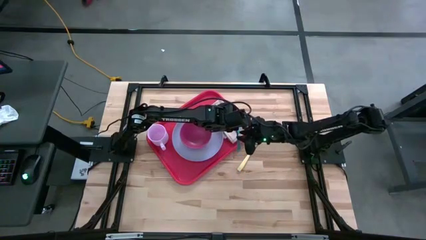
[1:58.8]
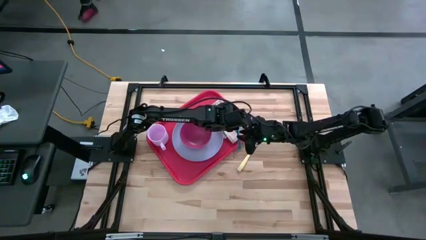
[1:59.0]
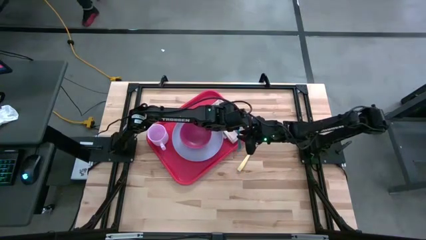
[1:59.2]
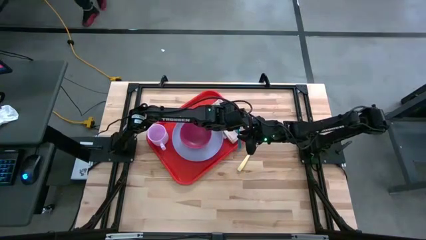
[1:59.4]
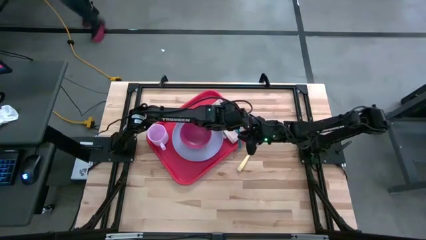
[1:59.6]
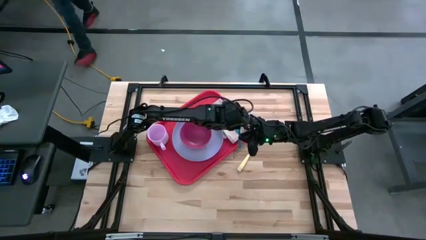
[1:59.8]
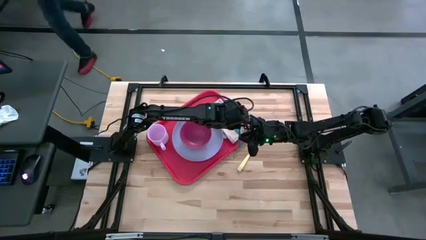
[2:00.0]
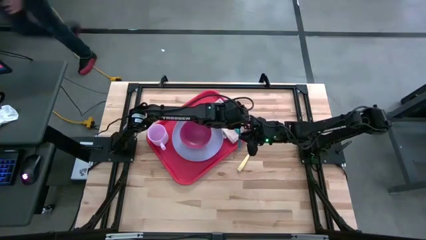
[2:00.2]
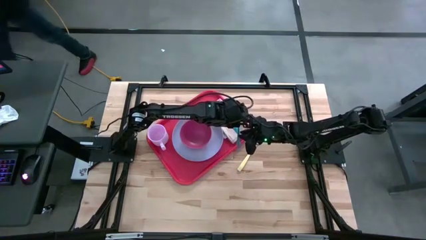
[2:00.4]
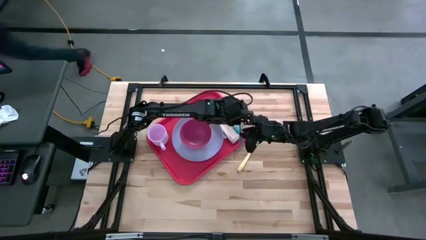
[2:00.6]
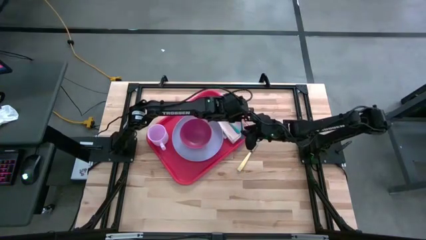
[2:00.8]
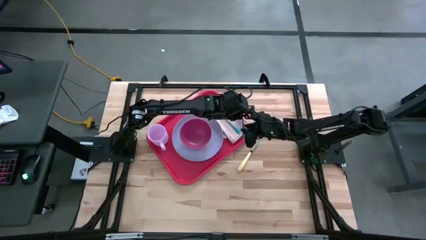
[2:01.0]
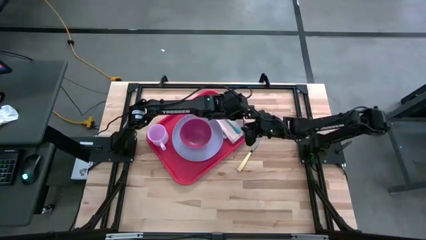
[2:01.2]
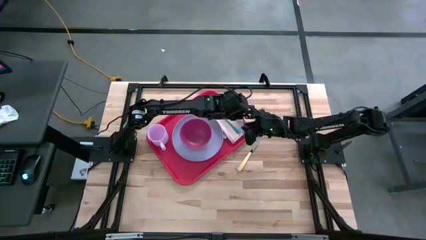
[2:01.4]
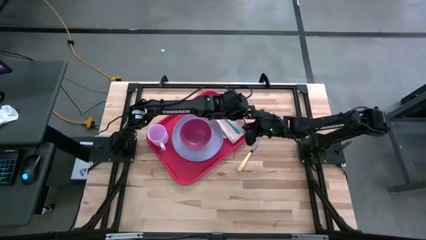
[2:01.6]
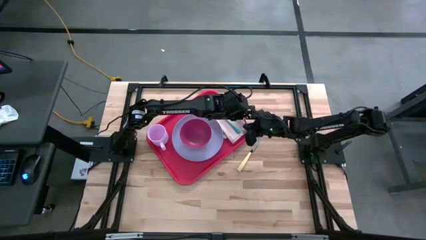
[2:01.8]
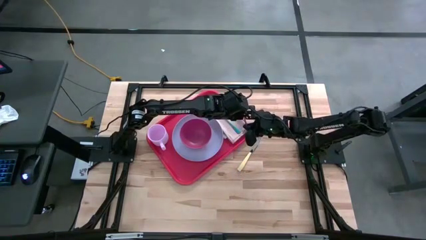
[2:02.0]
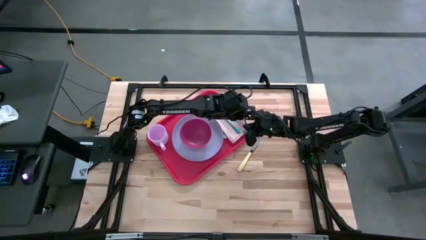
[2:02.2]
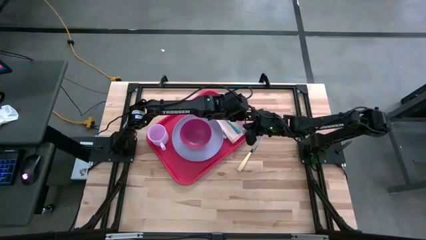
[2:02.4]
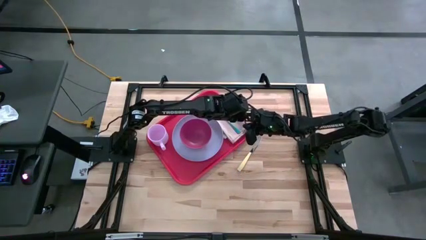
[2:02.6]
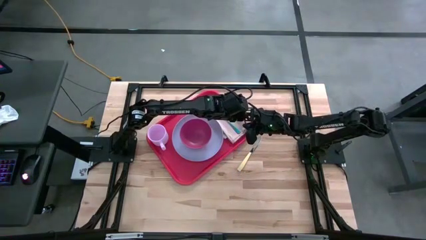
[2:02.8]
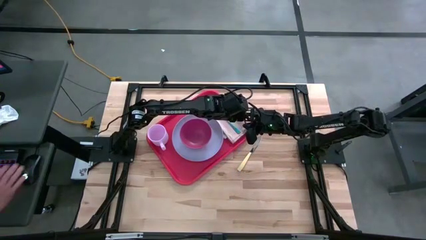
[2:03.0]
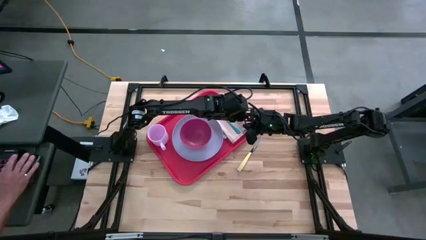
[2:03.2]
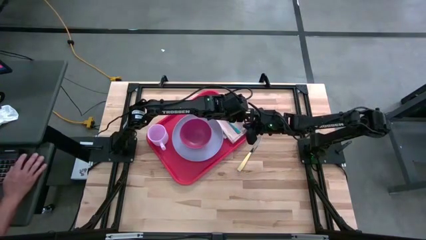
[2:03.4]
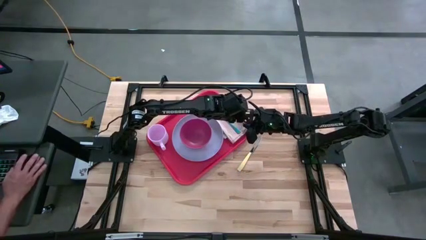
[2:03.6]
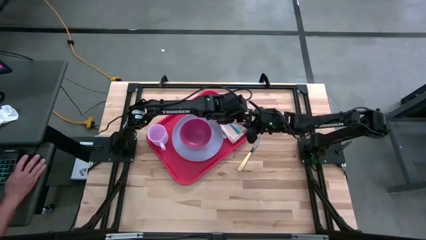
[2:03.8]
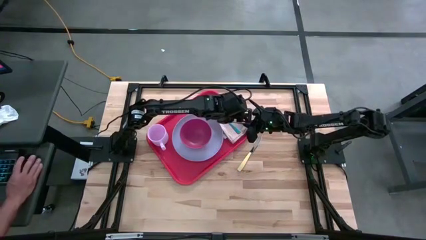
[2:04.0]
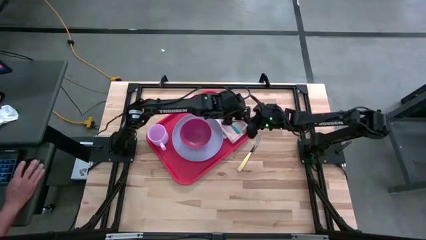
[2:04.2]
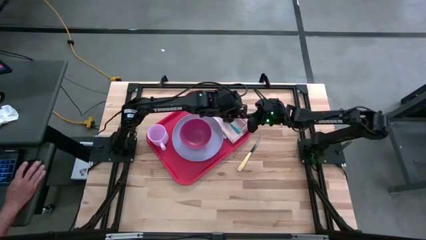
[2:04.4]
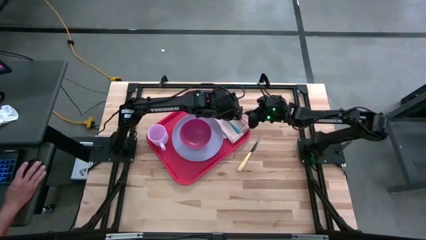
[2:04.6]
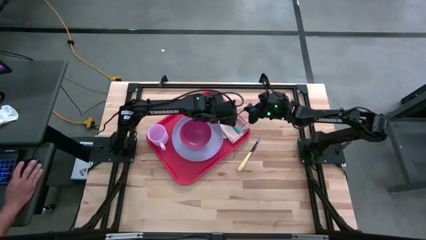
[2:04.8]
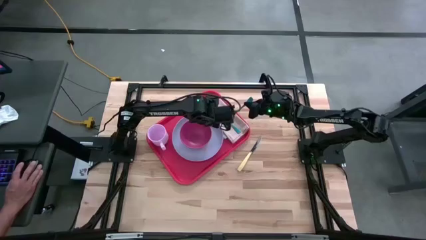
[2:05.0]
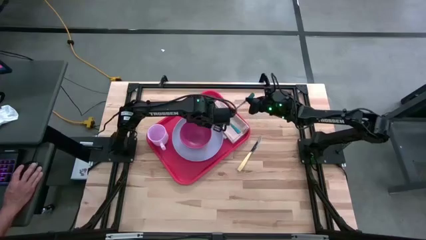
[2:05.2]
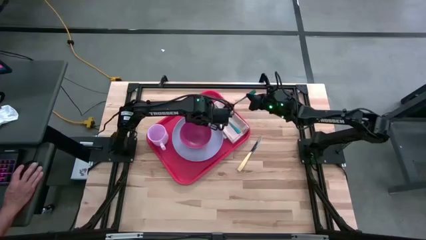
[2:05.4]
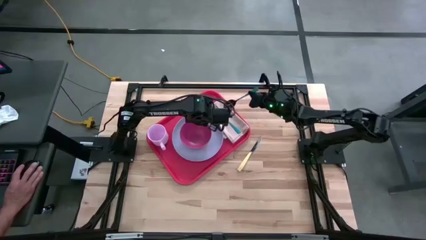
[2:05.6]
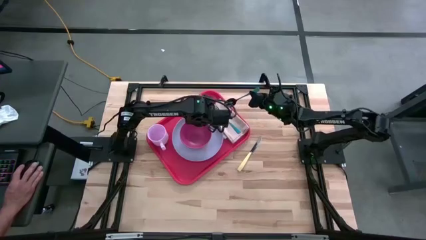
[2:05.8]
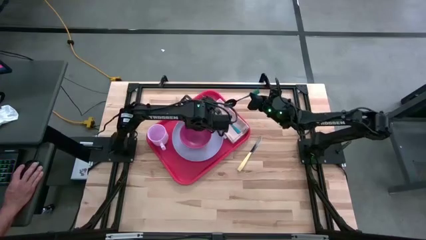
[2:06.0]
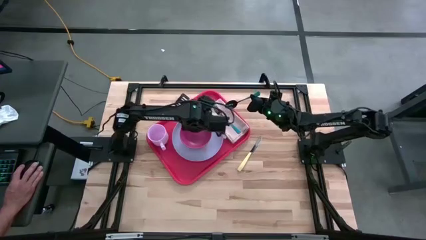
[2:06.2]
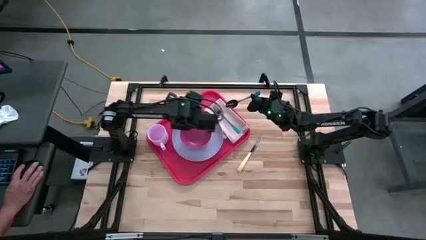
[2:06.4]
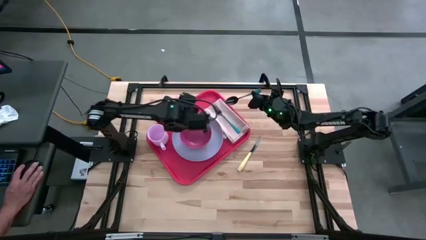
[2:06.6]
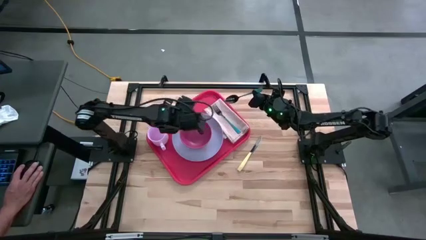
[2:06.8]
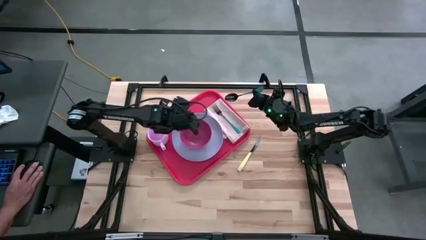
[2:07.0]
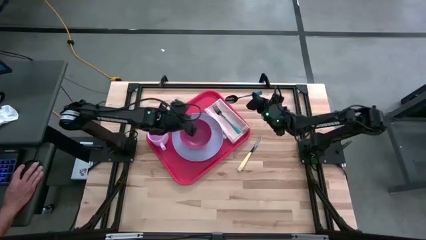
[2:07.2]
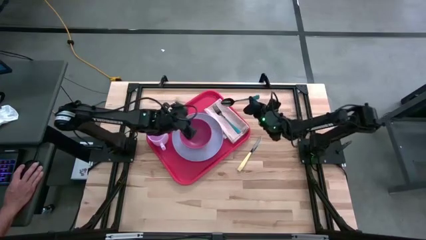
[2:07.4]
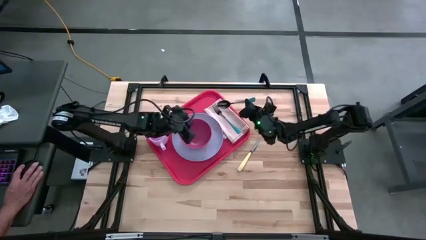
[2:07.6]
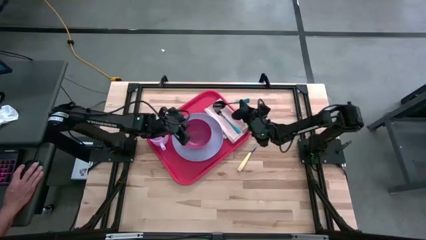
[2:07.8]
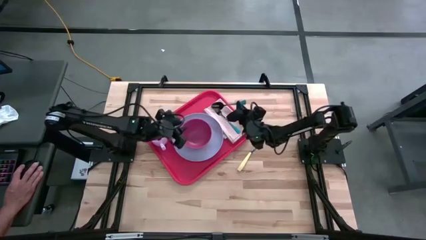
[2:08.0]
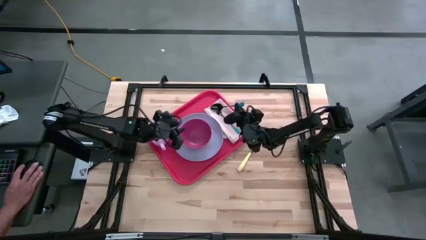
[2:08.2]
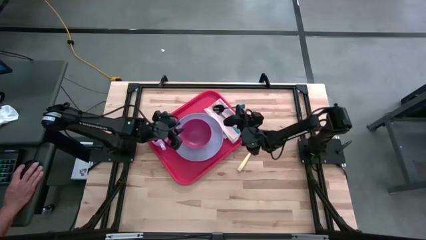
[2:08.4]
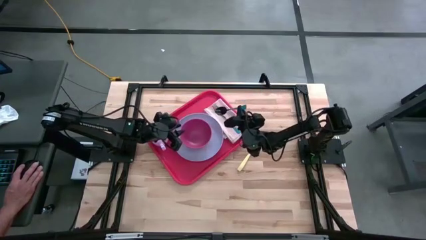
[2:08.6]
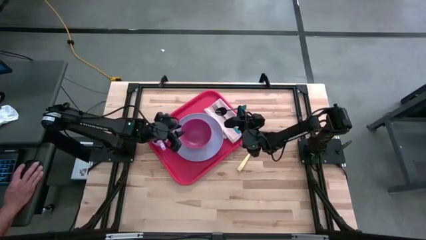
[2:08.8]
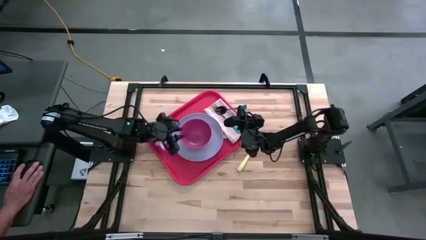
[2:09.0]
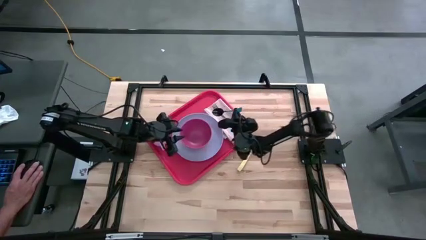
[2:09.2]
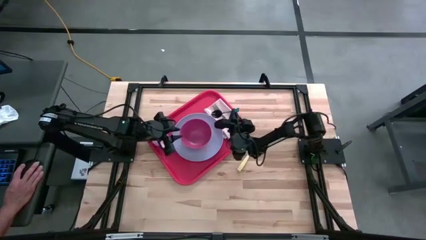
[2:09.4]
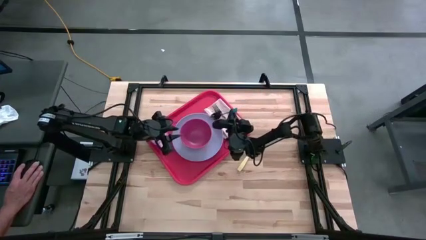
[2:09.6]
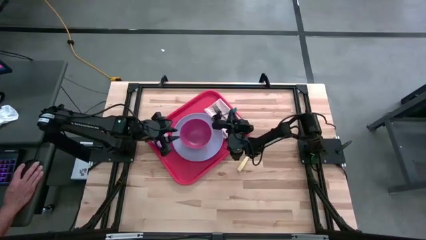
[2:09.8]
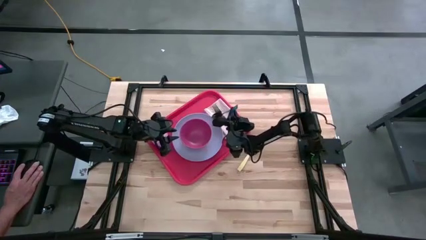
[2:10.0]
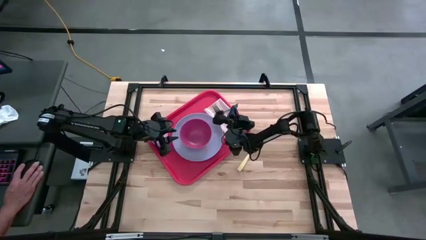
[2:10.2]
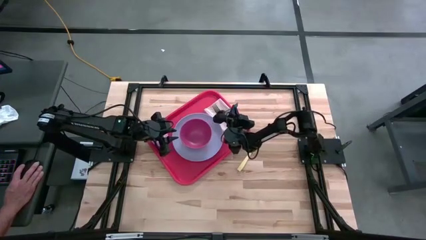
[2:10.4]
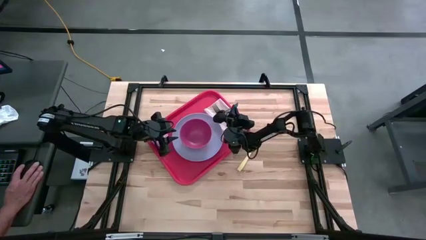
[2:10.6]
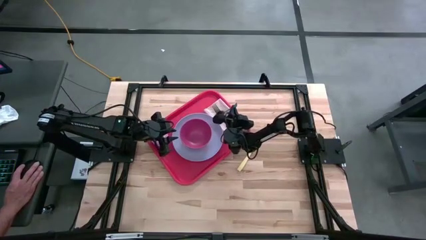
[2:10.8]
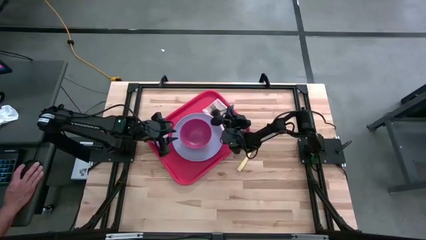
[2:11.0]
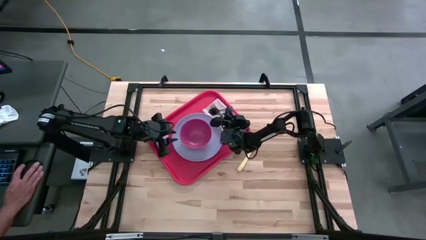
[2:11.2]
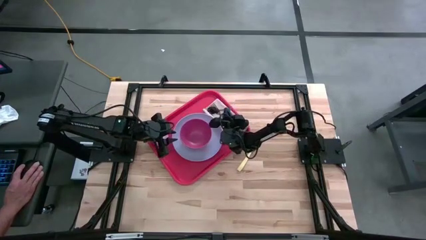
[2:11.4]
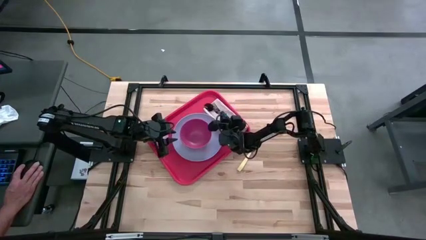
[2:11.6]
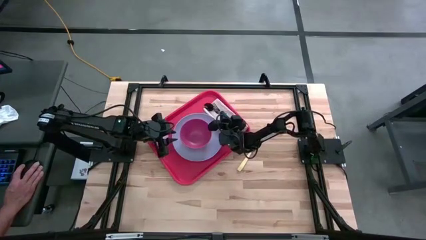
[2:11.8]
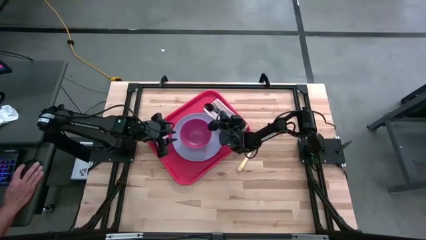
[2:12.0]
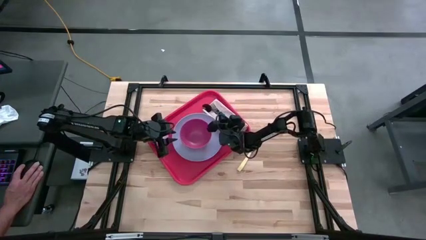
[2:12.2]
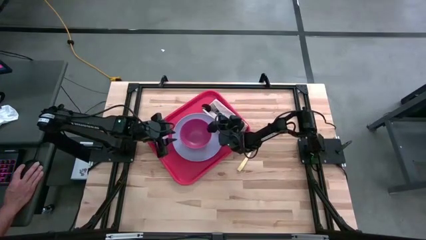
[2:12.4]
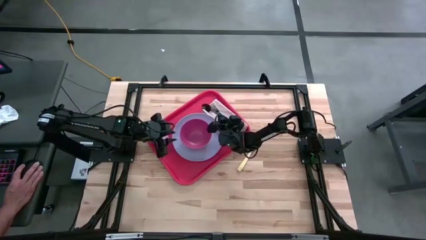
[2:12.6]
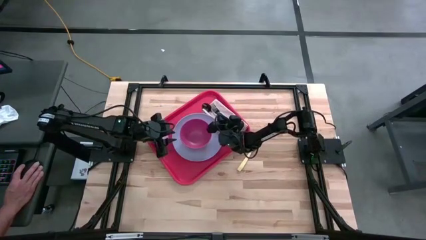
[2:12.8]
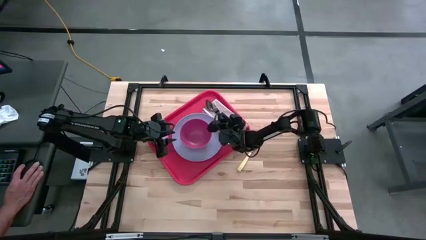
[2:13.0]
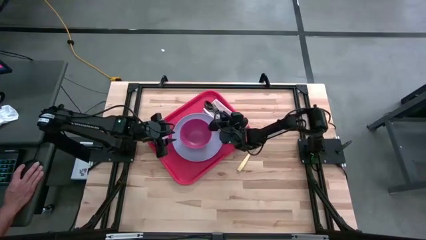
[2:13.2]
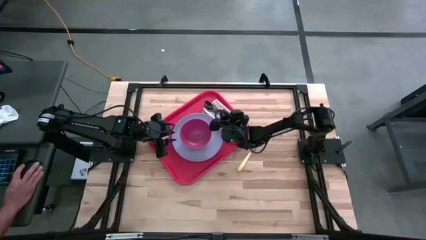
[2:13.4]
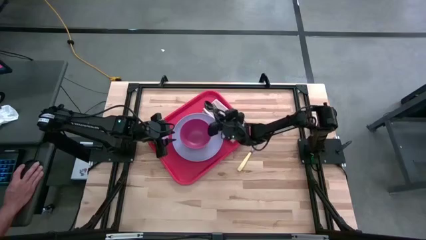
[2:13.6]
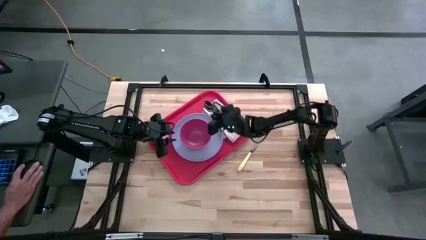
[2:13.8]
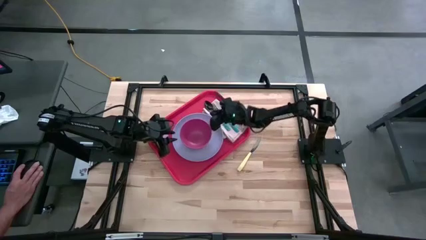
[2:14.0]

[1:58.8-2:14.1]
Task: Set up tray
Put the blue spoon on top of the brown table napkin to the left of the blue fork on the red serving tray

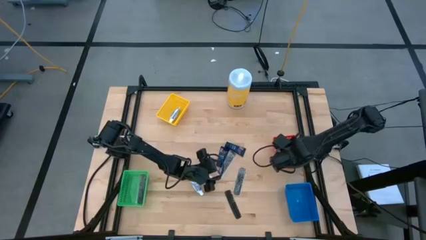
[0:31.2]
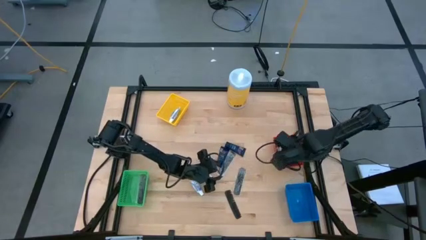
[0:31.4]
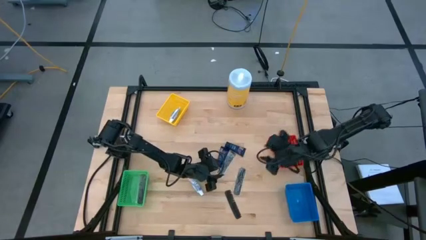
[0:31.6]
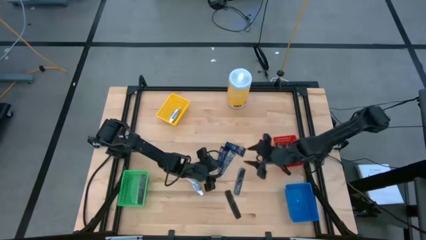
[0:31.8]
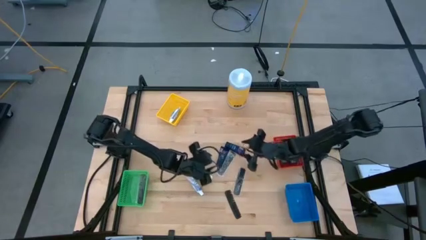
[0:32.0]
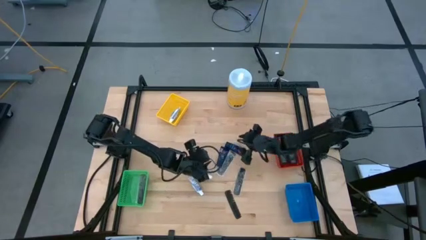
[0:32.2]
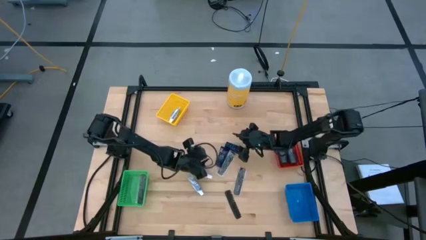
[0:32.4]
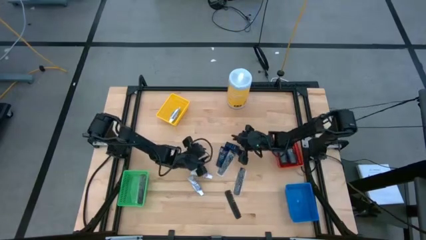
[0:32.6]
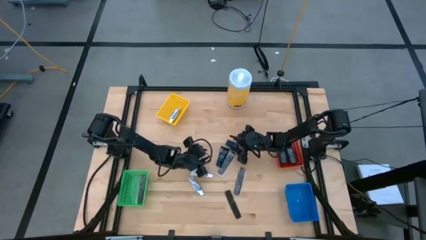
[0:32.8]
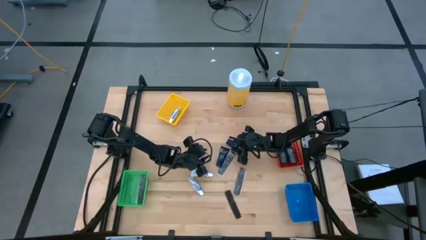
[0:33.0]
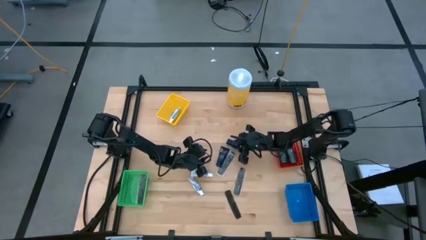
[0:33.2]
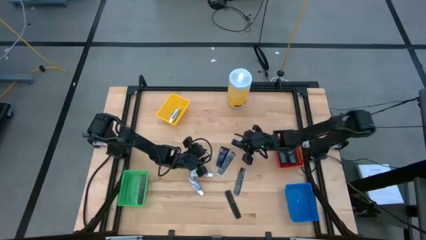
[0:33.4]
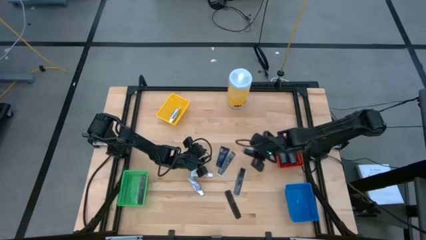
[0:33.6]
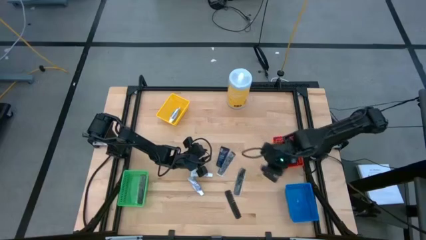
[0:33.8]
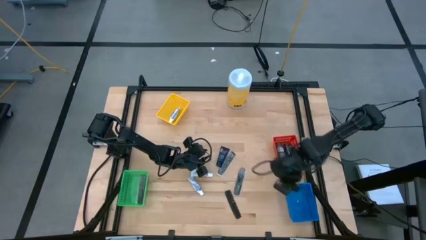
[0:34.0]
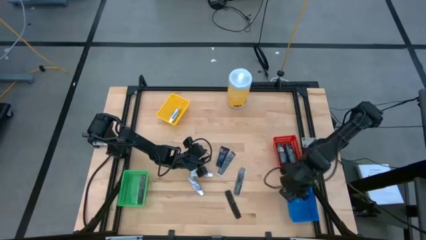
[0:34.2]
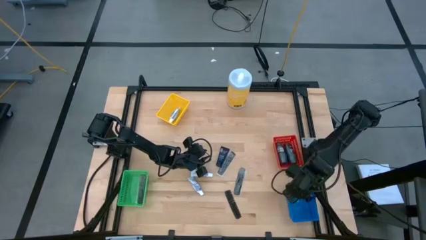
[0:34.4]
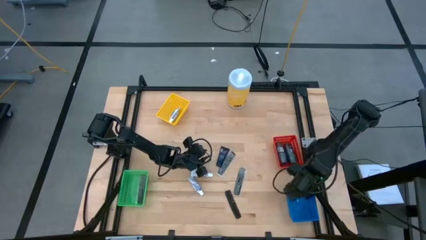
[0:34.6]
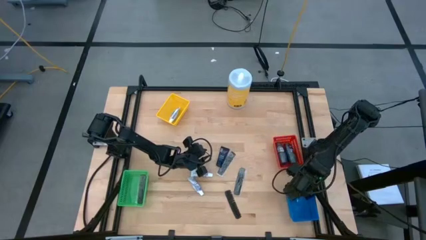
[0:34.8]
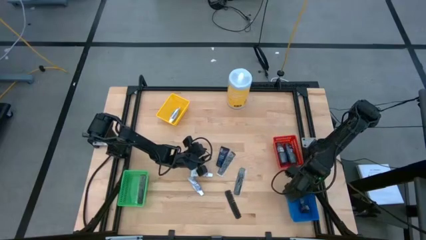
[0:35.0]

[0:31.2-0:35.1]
Task: Pick & Place Travel size toiletries
Put the blue shave cream into the blue bin
